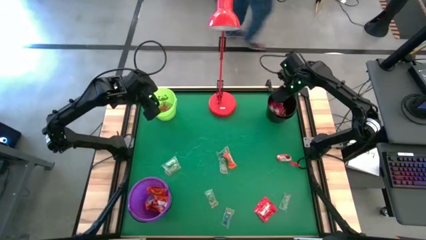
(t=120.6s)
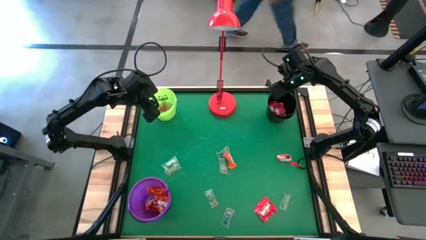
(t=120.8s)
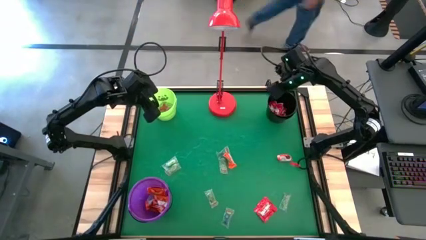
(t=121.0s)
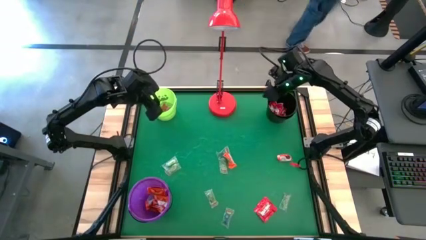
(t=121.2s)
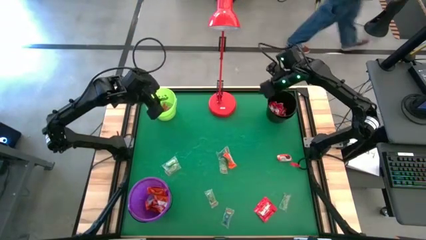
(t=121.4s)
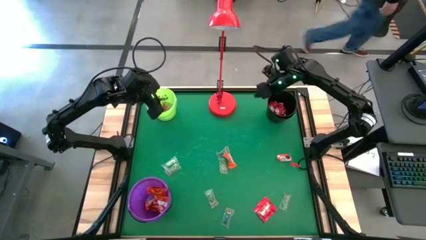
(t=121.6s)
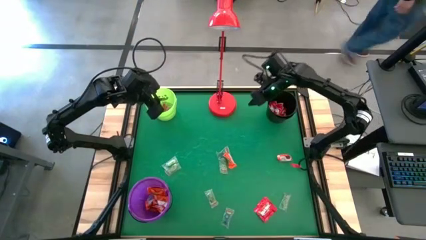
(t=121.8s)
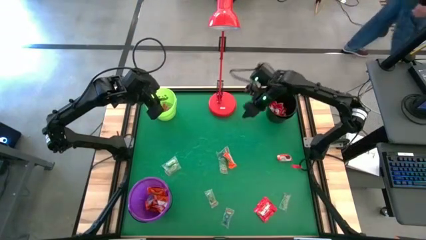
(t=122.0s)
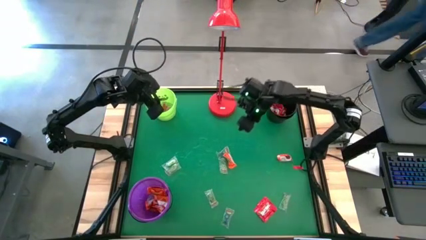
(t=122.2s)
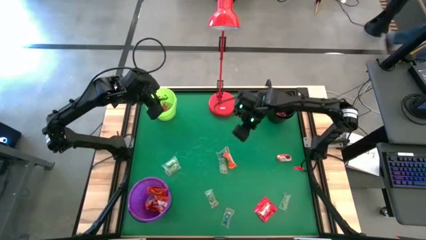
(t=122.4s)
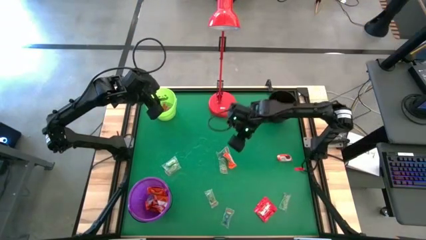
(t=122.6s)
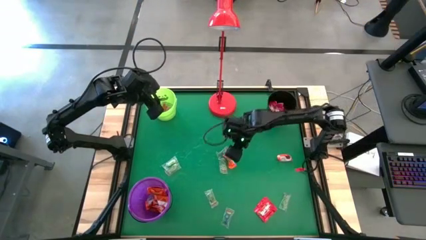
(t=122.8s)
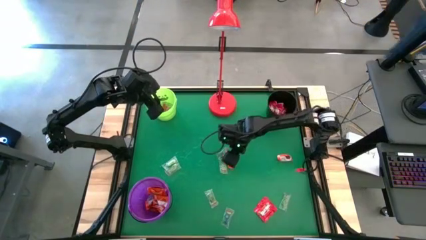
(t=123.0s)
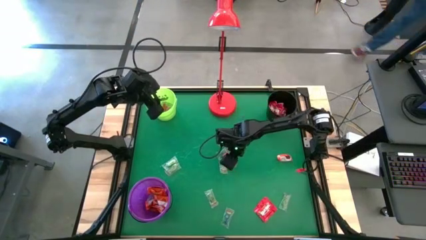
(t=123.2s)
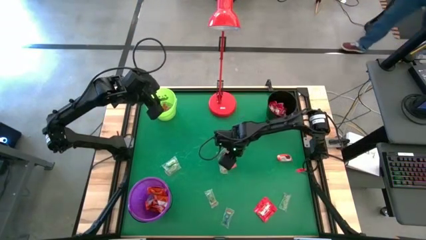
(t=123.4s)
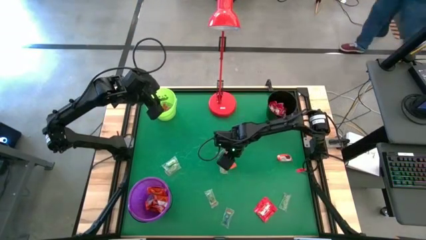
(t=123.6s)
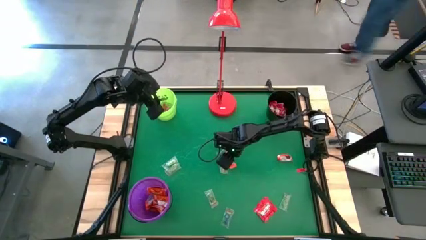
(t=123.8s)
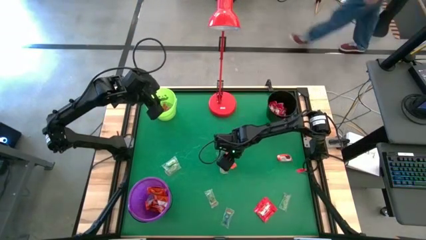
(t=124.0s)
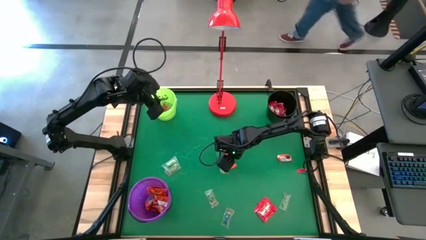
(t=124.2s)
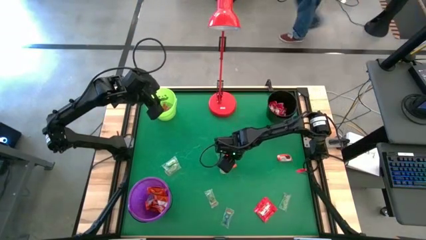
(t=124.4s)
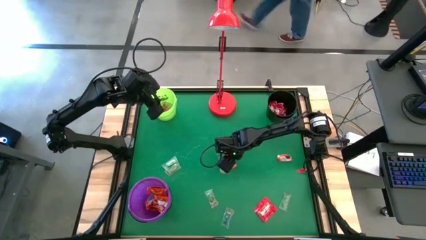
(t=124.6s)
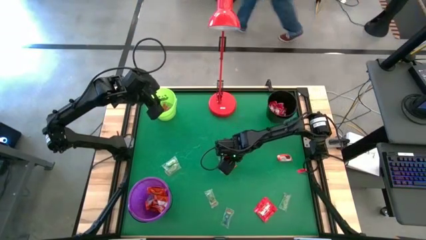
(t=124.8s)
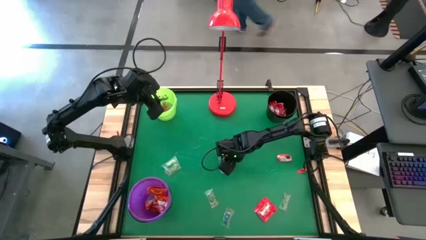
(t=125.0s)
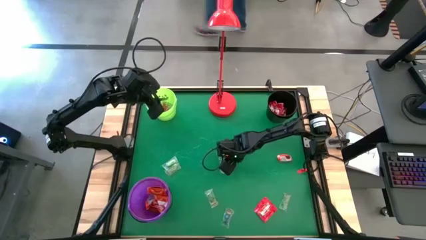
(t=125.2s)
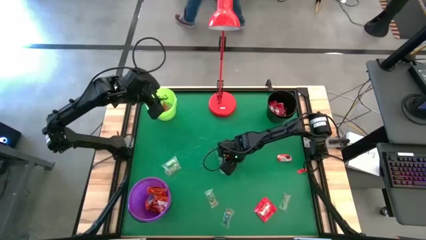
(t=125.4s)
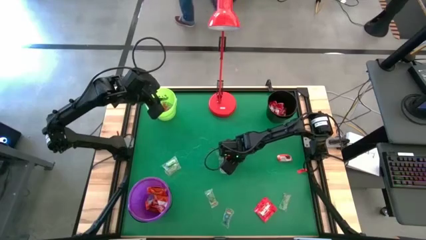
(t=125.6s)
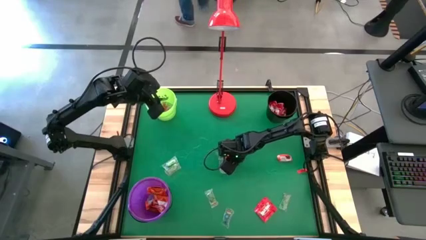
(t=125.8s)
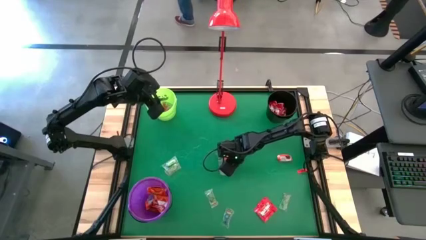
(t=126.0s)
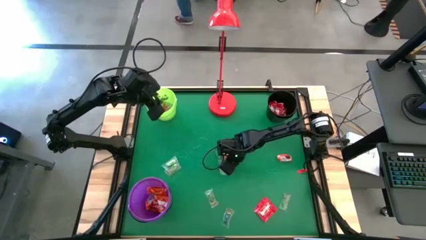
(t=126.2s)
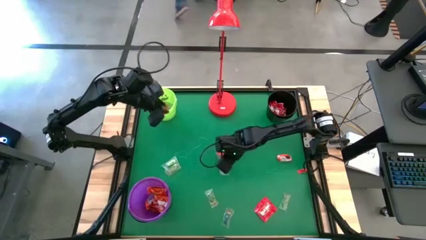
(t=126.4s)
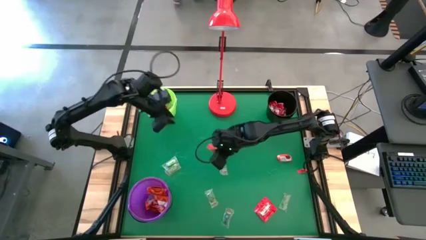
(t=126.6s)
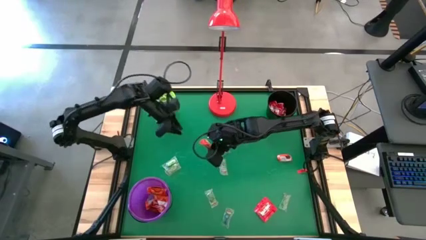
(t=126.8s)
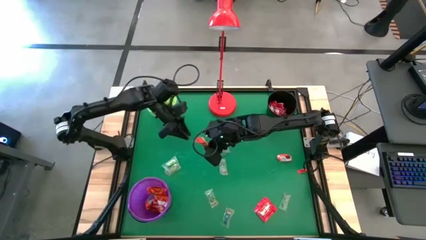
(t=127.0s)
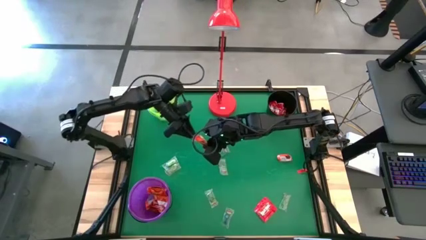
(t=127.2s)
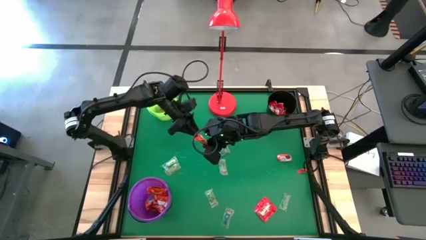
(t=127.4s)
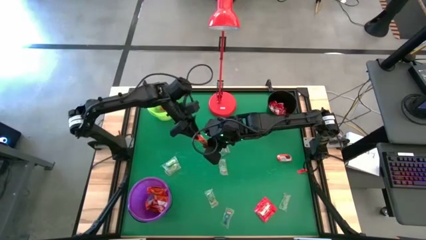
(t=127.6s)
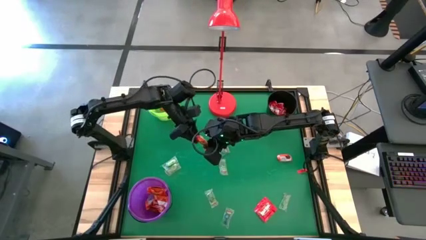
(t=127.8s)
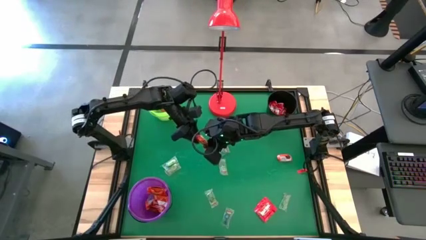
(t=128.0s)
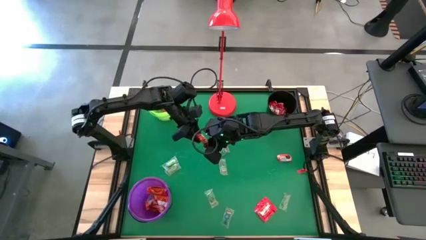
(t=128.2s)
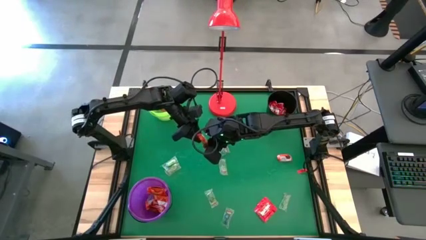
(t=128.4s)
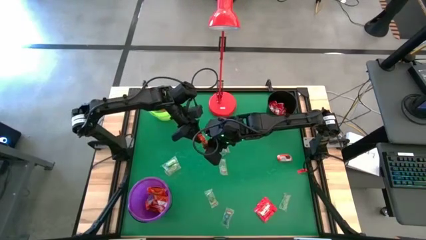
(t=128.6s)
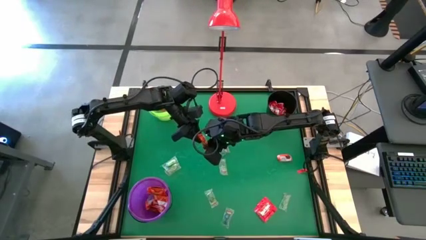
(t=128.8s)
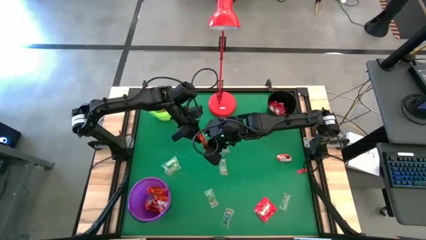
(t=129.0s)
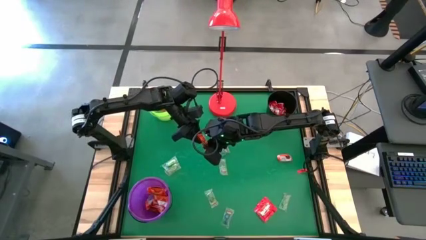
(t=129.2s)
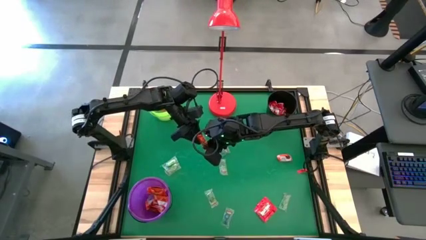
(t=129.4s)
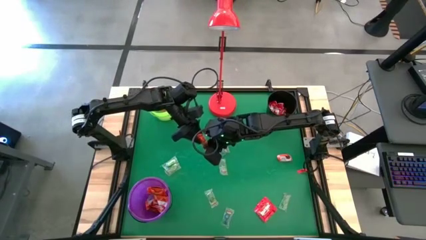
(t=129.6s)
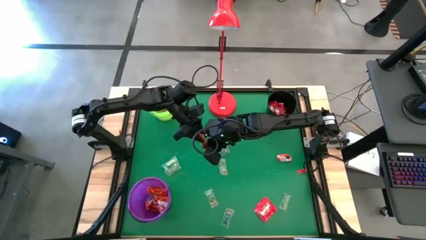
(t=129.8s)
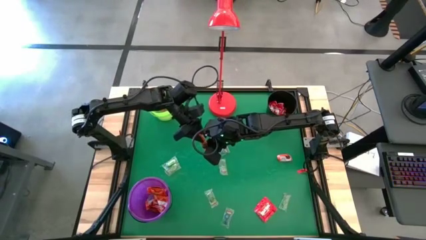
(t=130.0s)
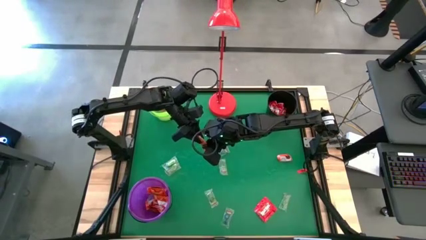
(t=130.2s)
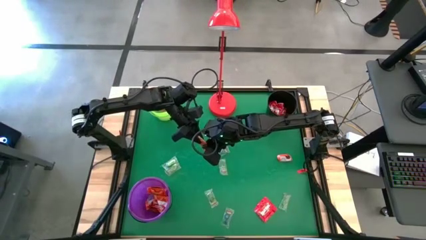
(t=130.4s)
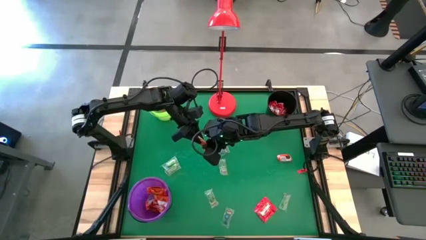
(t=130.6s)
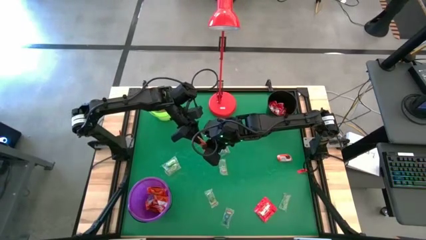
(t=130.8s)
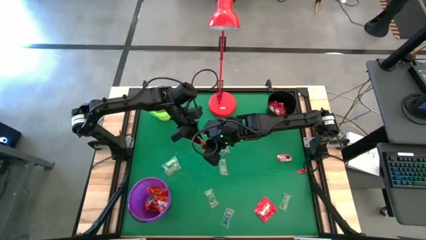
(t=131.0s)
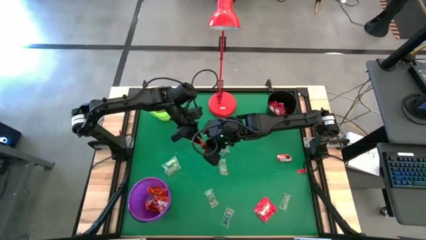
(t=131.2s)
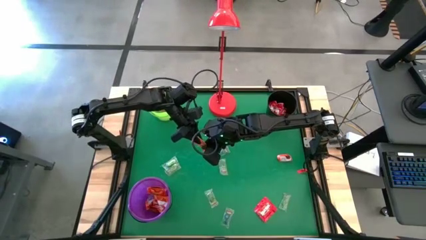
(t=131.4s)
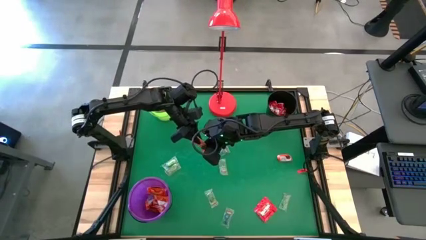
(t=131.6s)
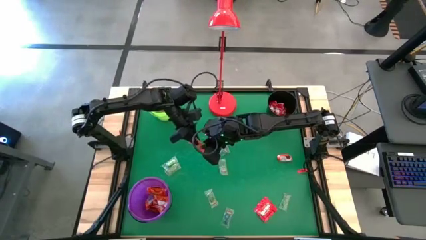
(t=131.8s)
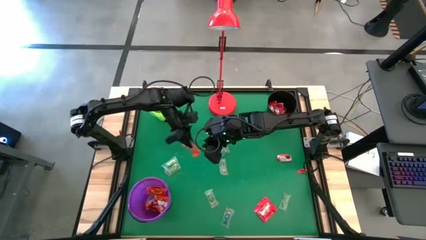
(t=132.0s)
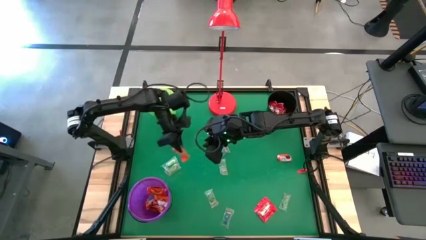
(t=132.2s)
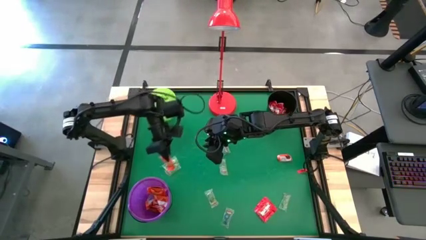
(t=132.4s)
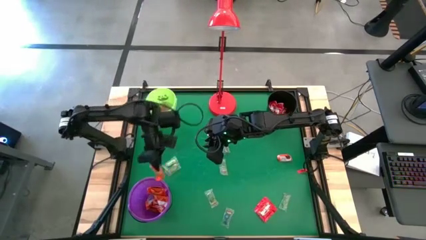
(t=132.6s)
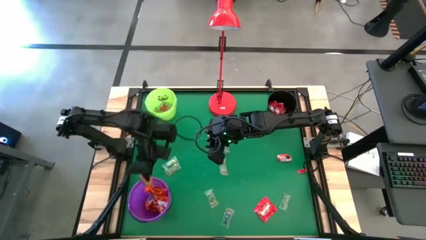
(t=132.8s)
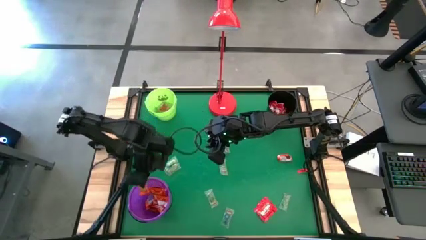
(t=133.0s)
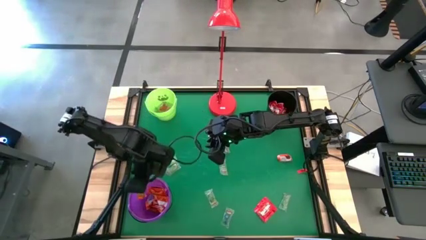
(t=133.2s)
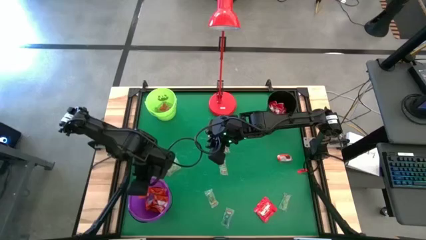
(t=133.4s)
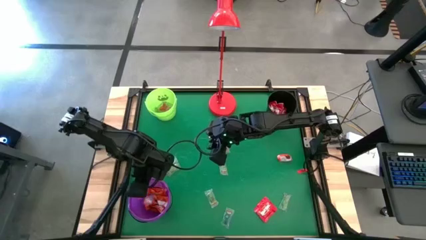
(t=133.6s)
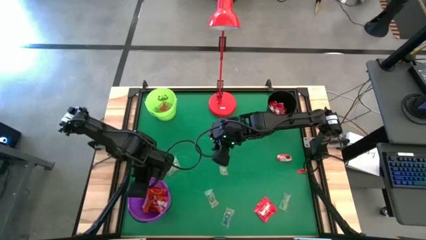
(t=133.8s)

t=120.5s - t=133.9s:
Task: Sort candy
Put the orange candy into the violet bucket
